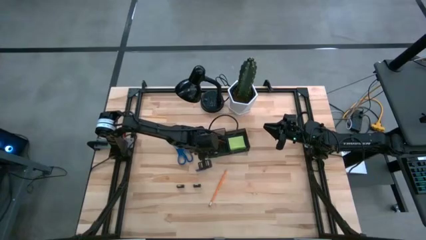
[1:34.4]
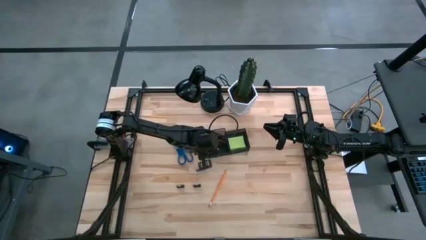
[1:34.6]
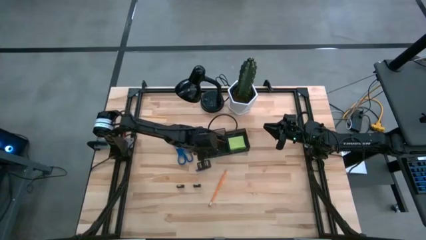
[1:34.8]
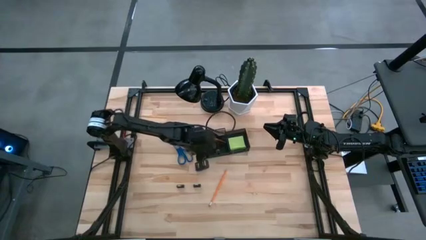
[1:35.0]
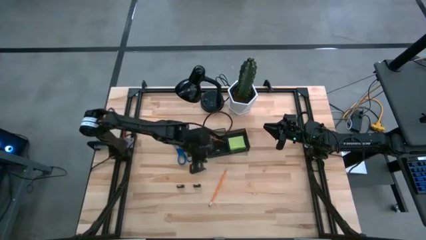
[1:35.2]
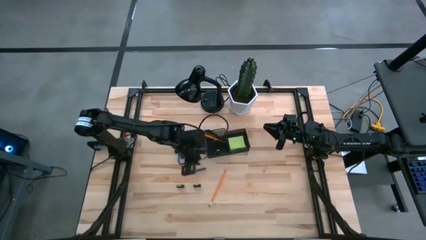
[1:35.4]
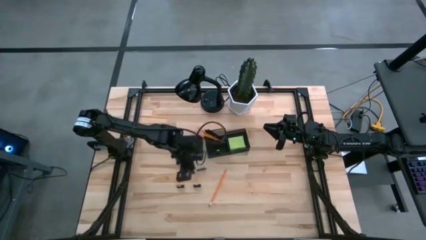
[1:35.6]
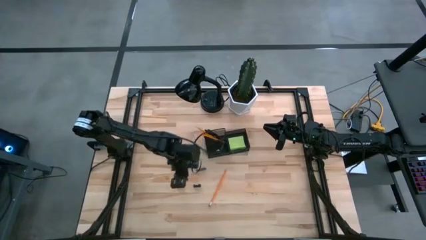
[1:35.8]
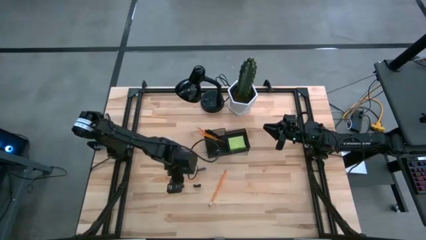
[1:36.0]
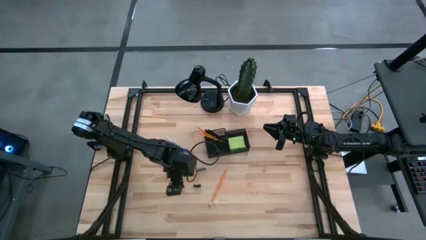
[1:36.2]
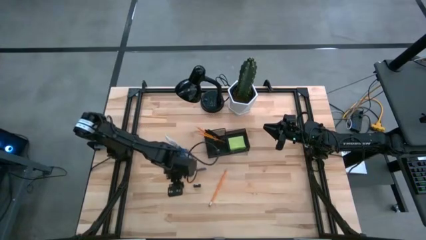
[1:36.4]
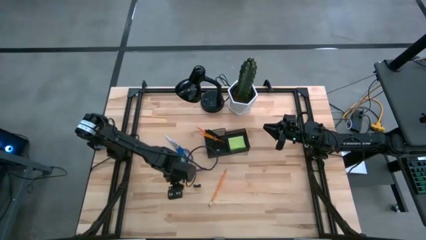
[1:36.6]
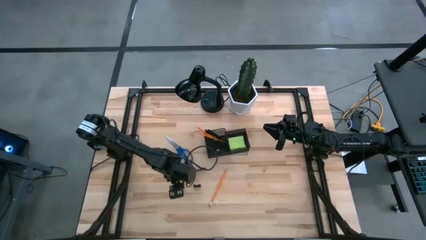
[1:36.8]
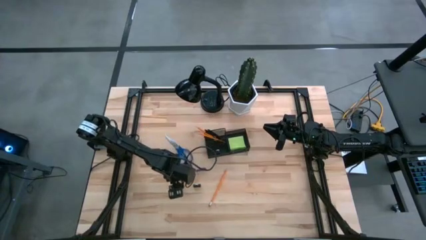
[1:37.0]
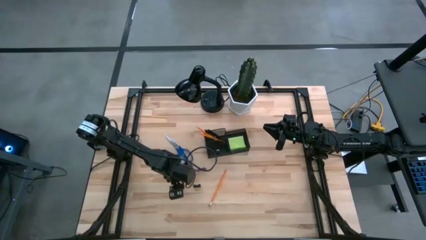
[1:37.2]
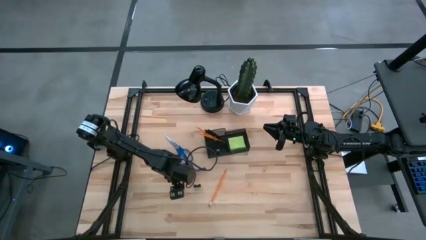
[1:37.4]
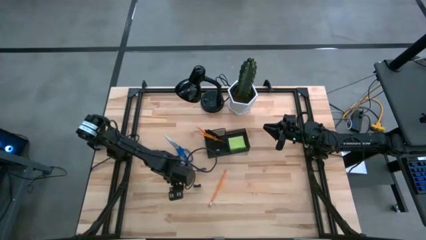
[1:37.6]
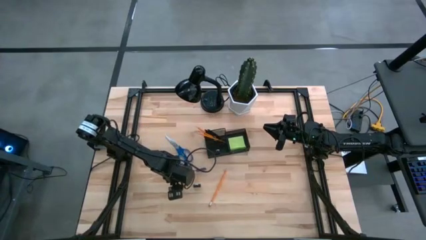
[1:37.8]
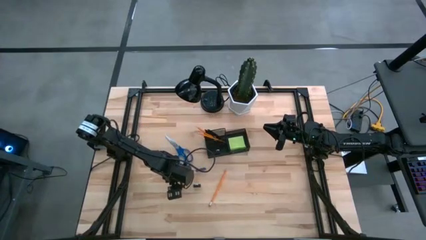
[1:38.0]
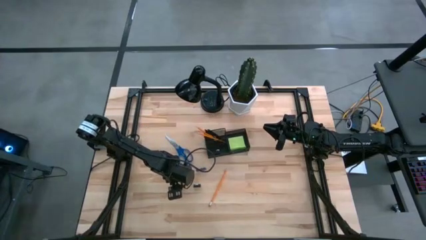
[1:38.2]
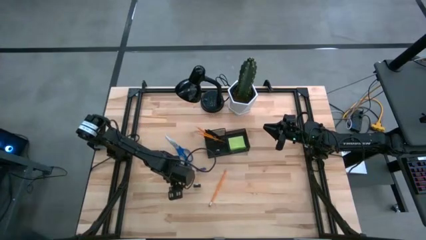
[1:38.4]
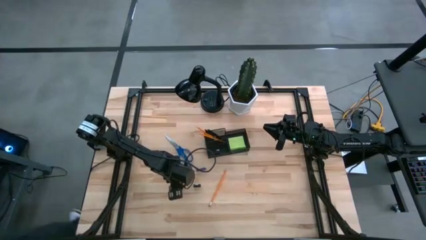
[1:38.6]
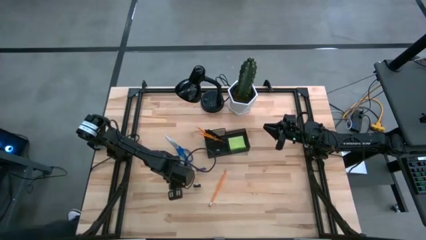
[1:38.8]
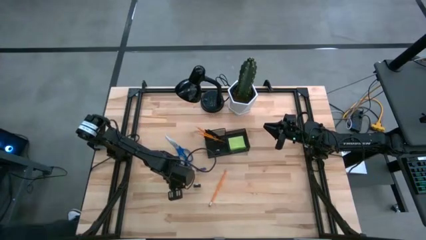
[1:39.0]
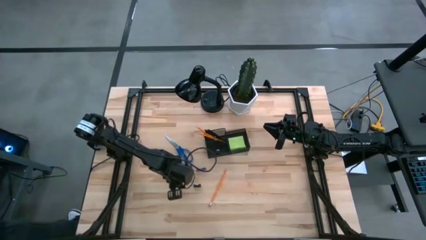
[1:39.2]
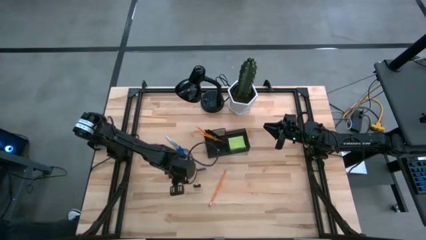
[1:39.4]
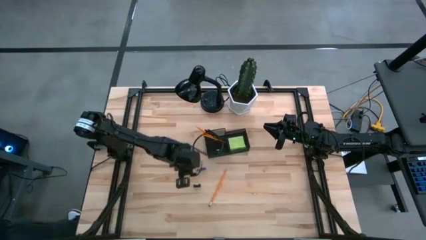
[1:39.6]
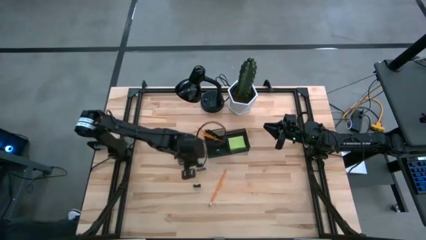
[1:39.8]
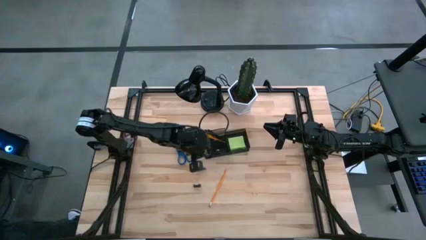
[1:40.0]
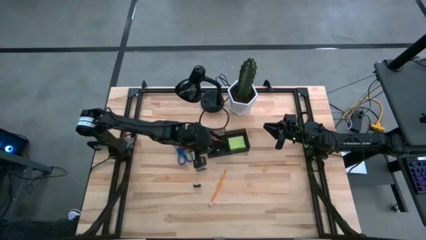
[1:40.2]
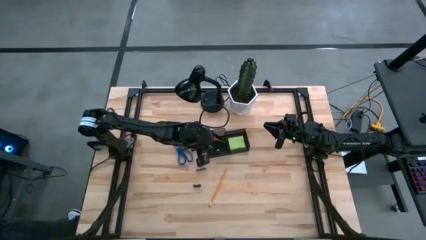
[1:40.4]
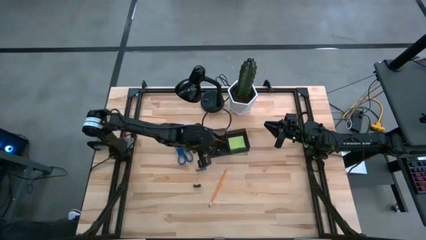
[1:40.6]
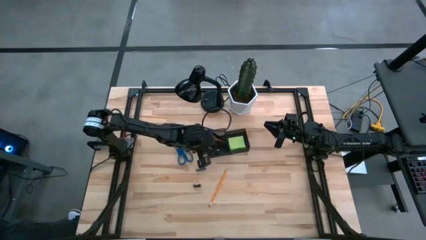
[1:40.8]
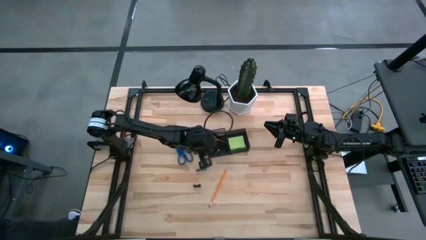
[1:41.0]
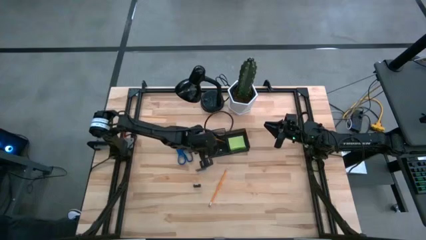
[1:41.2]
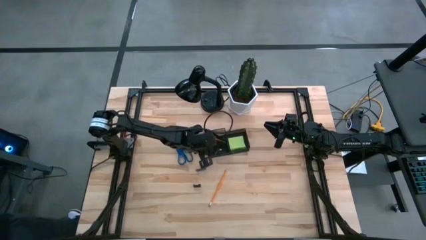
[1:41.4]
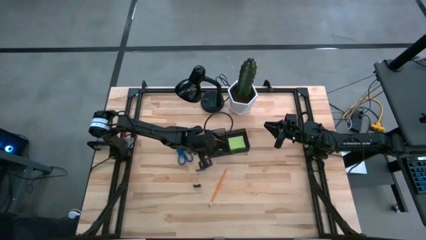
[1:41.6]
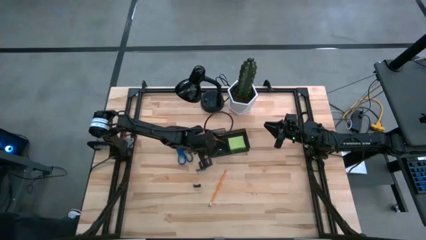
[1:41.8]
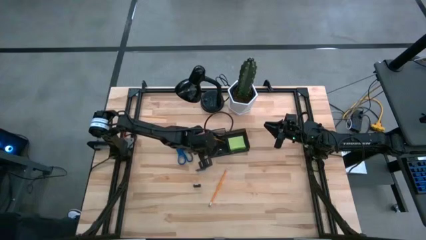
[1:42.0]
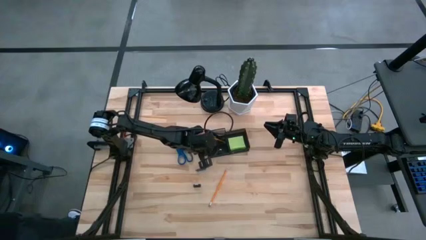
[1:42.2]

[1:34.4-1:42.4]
Task: Pick and place office supplies into organizer
Put the black binder clip into the desk organizer

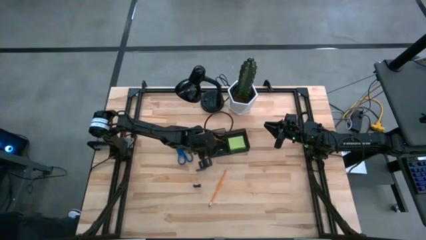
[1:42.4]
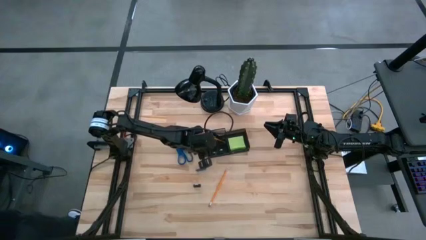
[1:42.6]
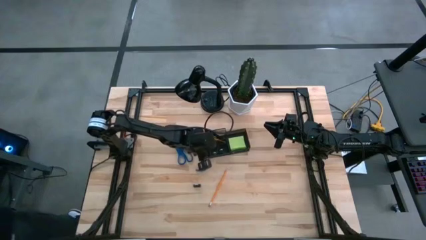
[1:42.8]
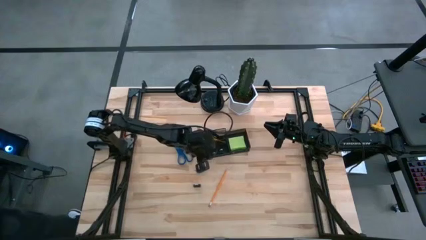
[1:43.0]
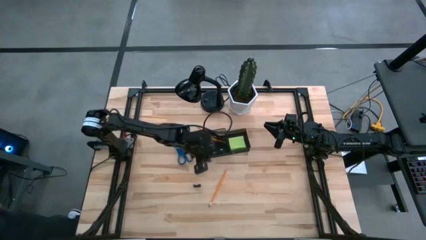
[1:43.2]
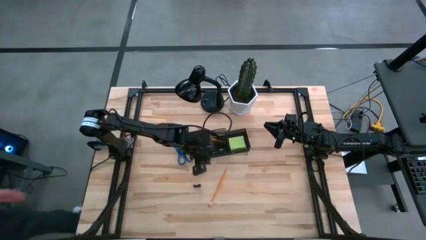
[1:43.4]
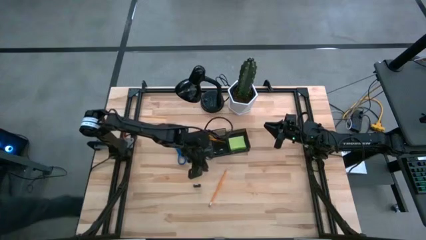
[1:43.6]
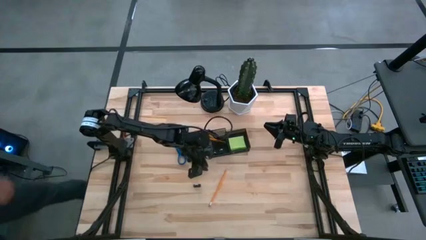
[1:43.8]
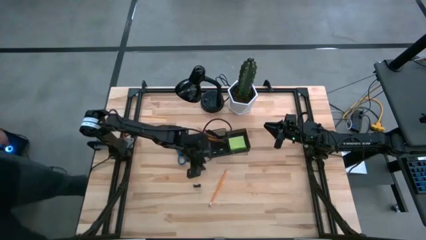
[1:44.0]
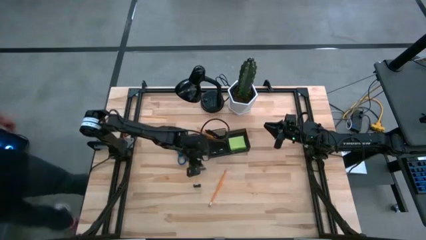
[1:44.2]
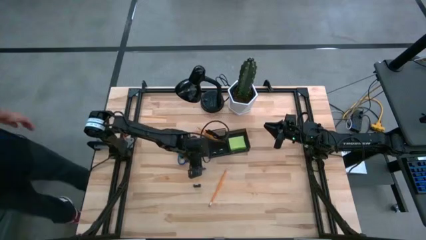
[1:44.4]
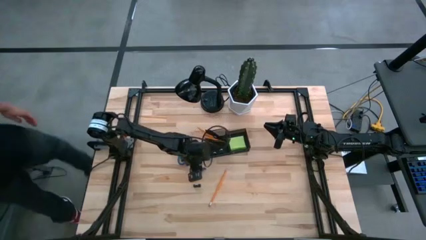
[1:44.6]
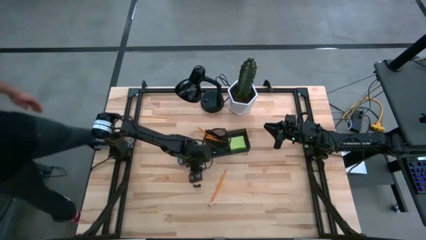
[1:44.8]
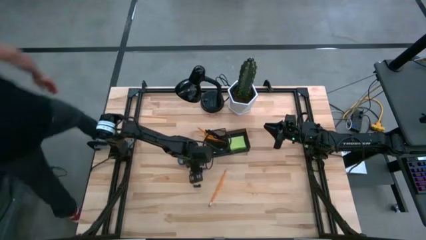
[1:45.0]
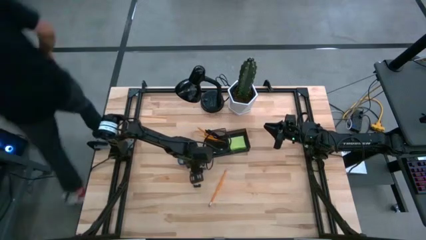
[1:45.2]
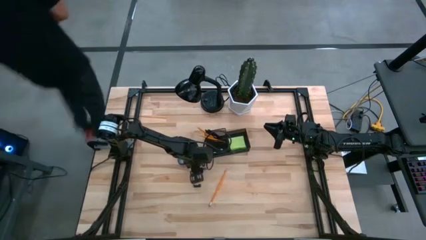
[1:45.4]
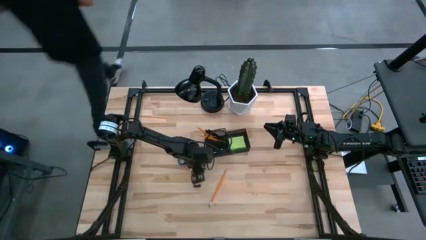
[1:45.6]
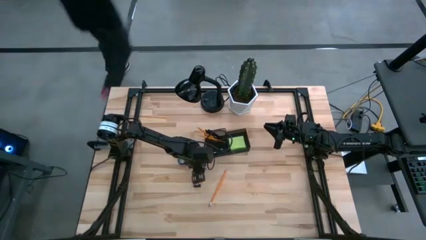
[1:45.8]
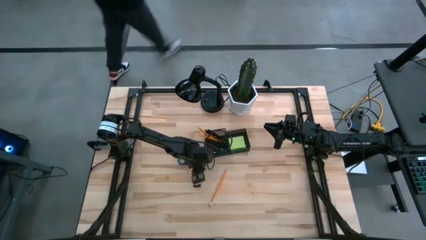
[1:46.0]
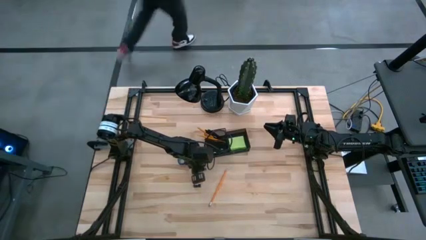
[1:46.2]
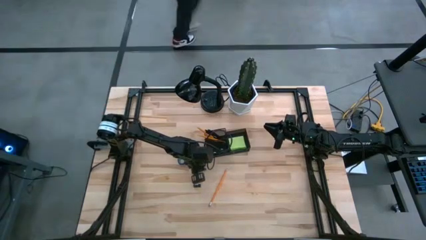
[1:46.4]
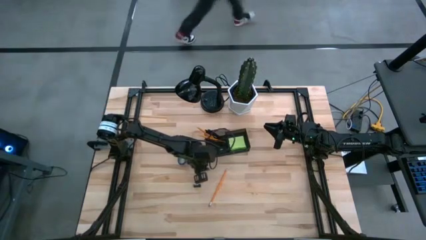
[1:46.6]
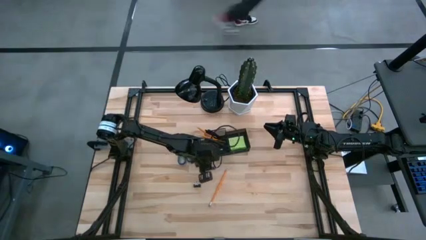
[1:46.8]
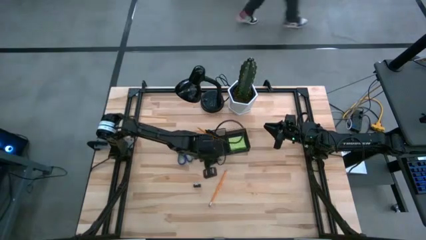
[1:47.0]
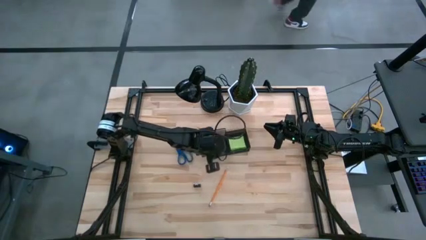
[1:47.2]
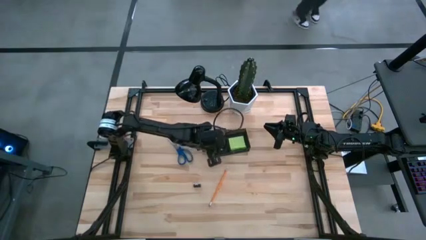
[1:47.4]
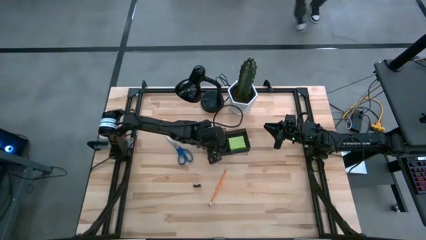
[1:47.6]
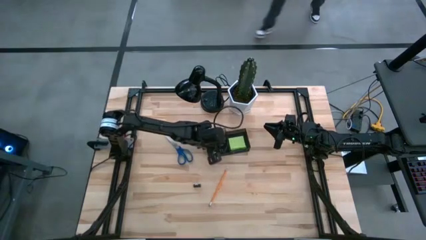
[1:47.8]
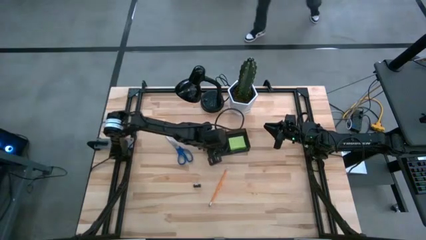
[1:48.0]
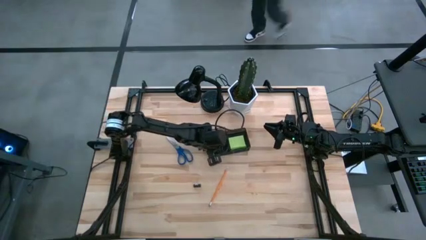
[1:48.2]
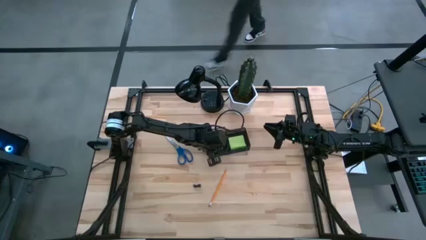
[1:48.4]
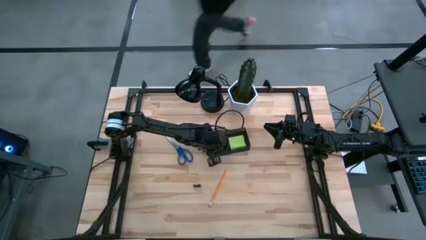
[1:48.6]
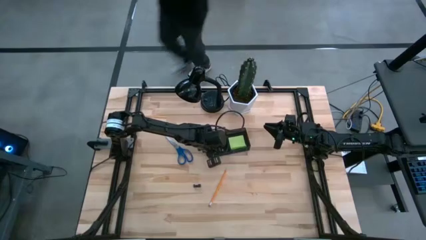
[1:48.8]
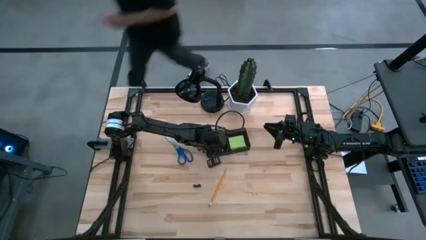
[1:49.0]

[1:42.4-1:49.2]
Put the blue eraser into the desk organizer
